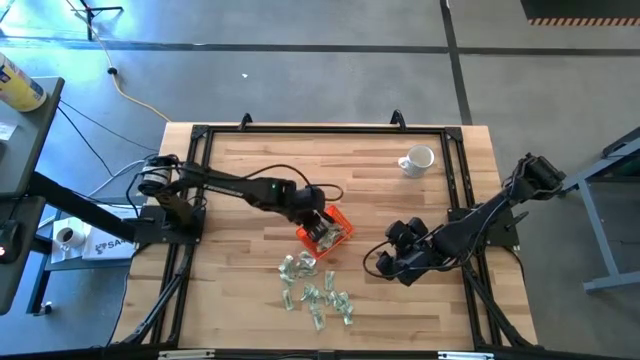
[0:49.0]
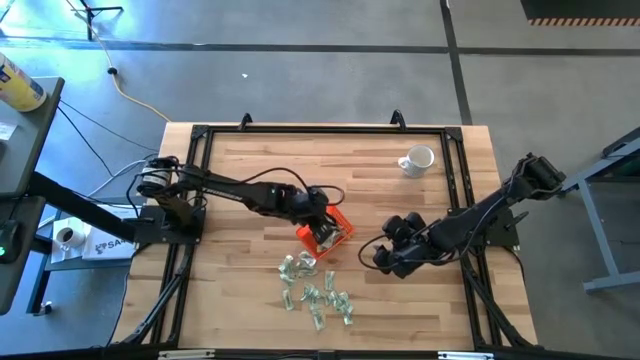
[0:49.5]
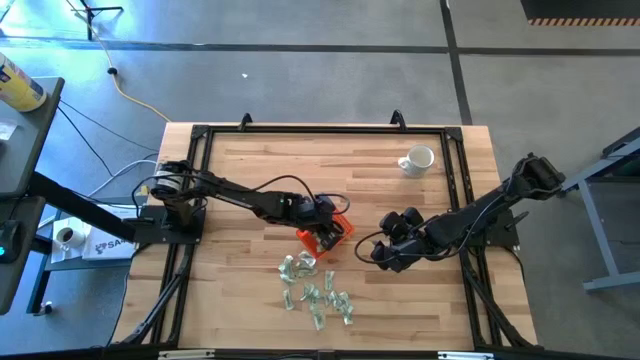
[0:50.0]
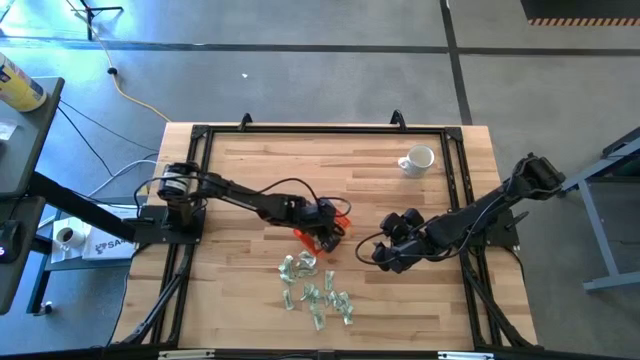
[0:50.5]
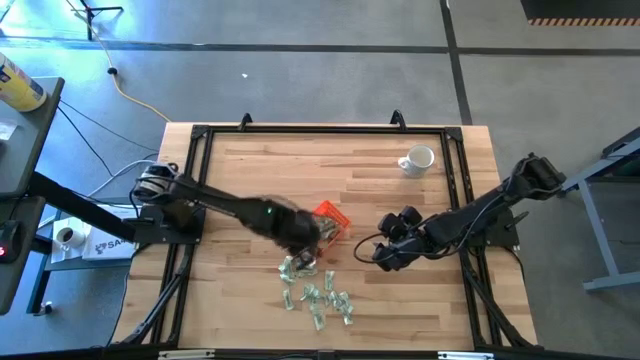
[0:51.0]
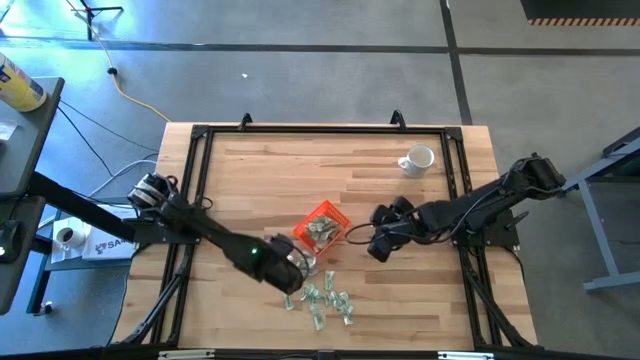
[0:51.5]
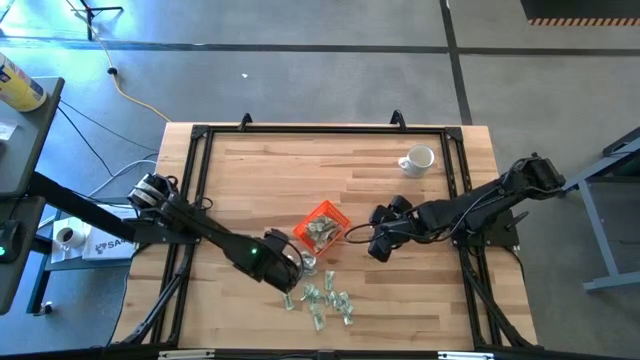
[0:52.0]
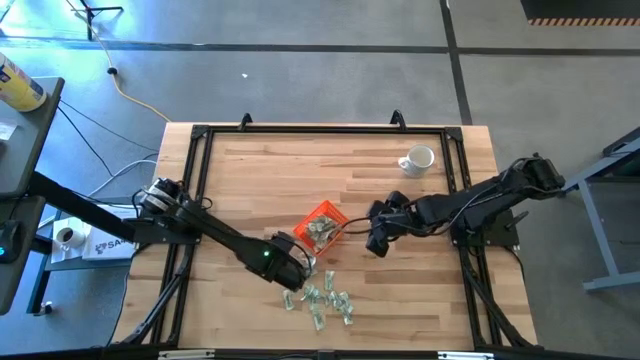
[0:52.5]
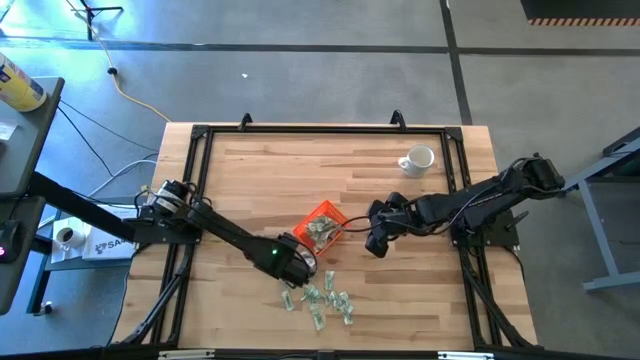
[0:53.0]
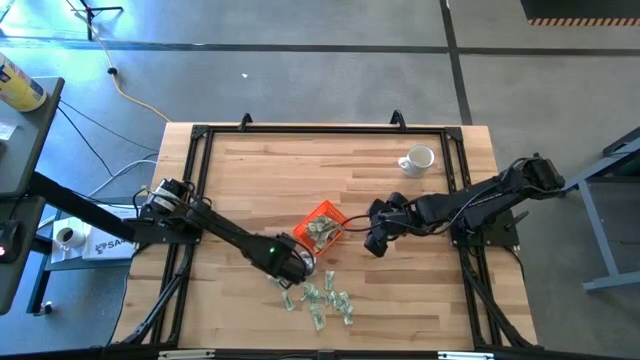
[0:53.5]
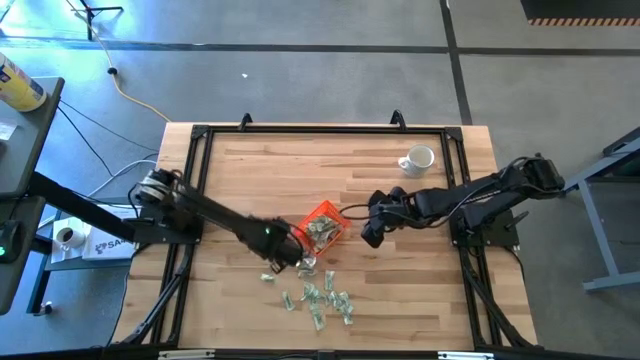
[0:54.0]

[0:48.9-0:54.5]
Task: Pick and place Stevia / Truvia into bins
Put the stevia packet into the orange bin

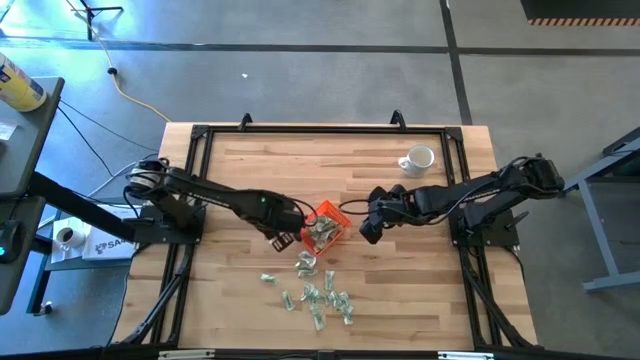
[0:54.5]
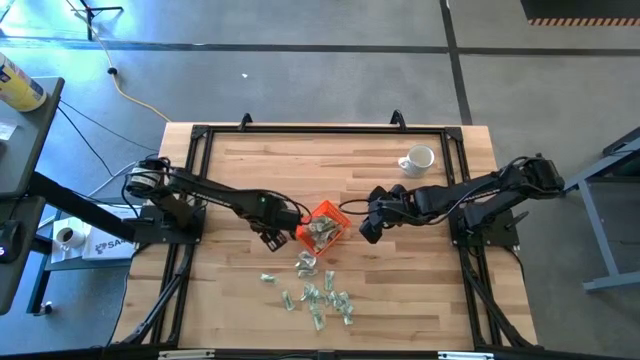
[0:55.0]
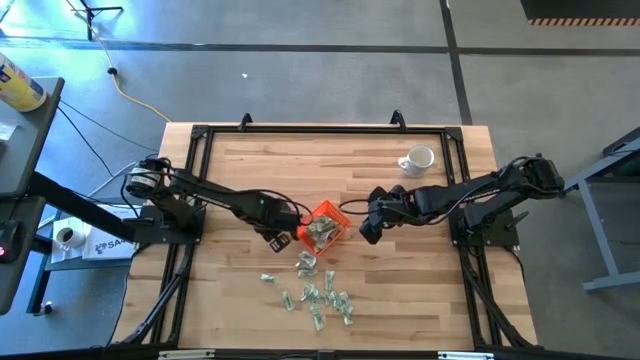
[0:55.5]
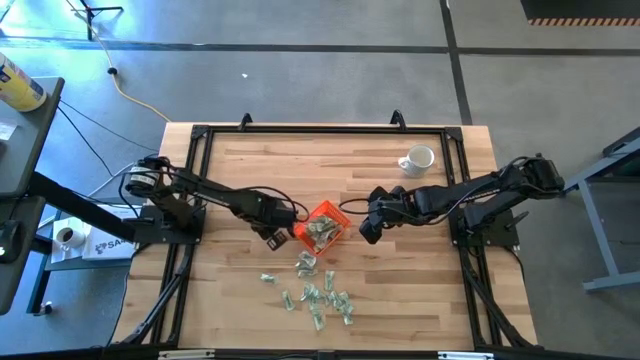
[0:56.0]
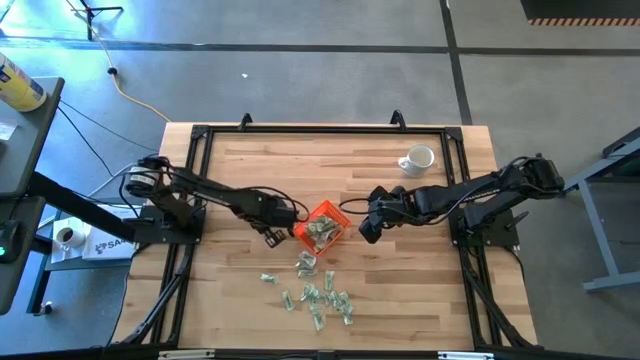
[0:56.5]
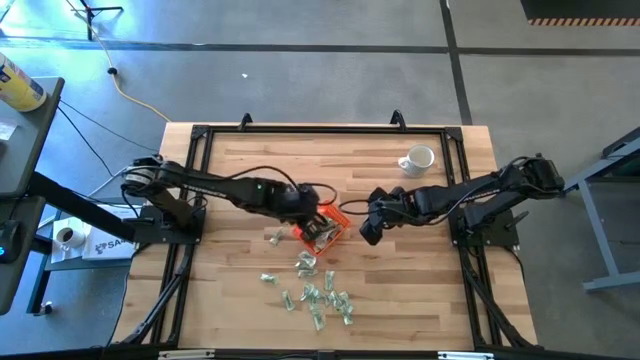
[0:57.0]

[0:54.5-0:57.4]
Put the stevia packet into the orange bin

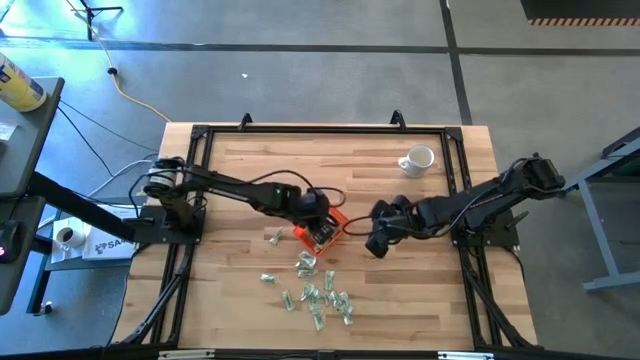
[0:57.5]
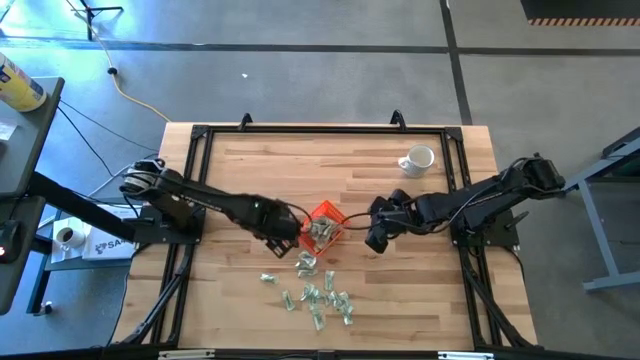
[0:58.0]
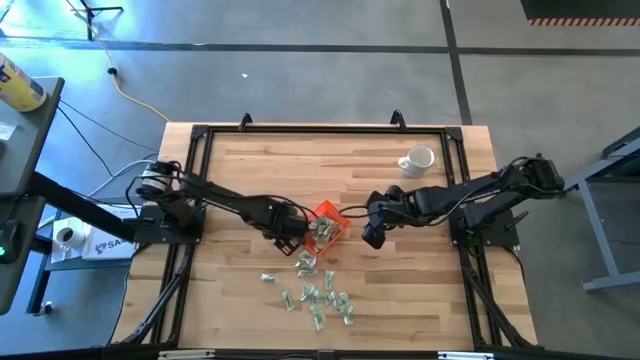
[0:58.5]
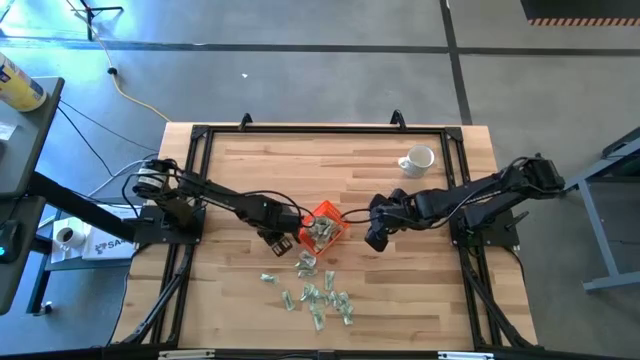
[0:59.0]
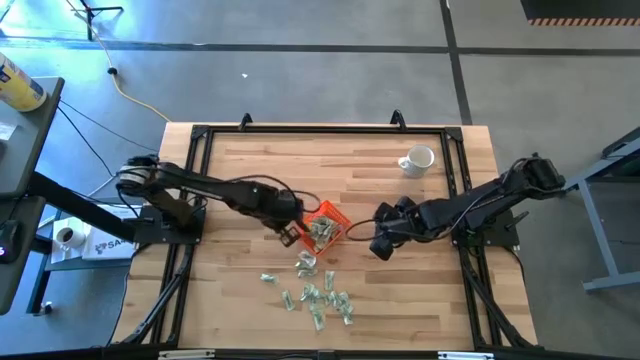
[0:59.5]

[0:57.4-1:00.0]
Put the stevia packet into the orange bin

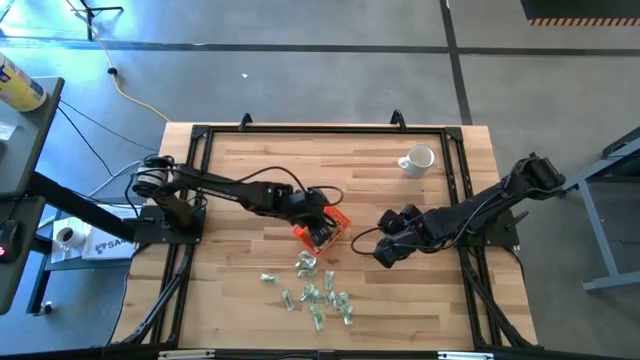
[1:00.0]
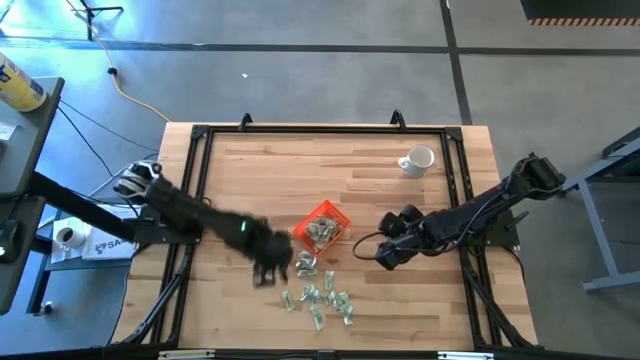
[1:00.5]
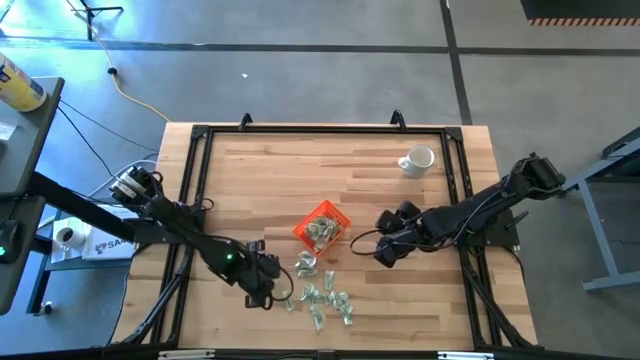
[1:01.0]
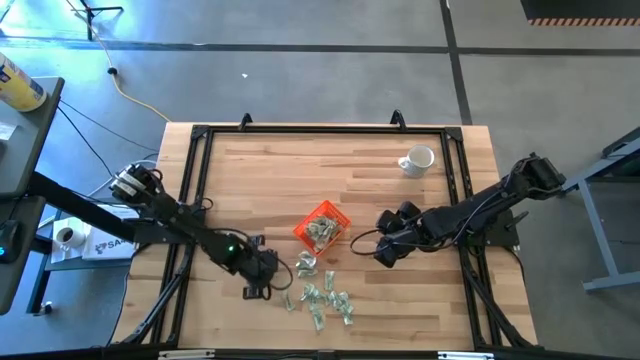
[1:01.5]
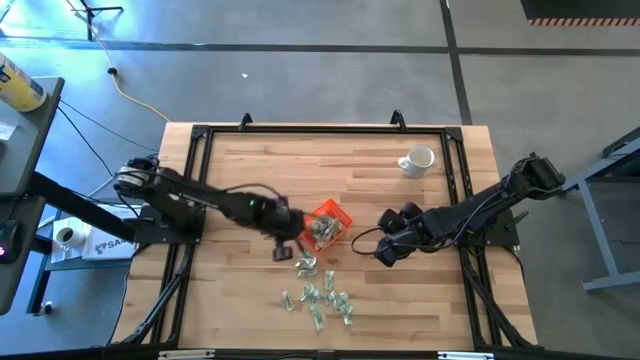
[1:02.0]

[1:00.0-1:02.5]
Put the stevia packet into the orange bin

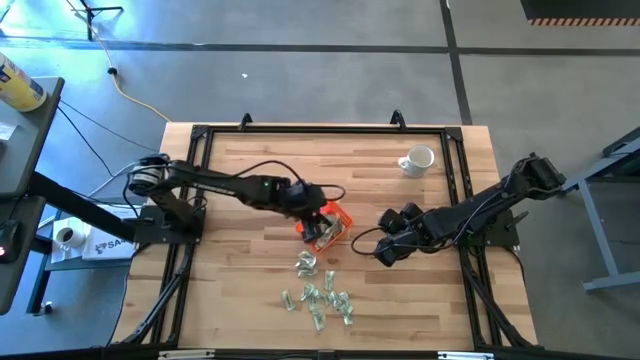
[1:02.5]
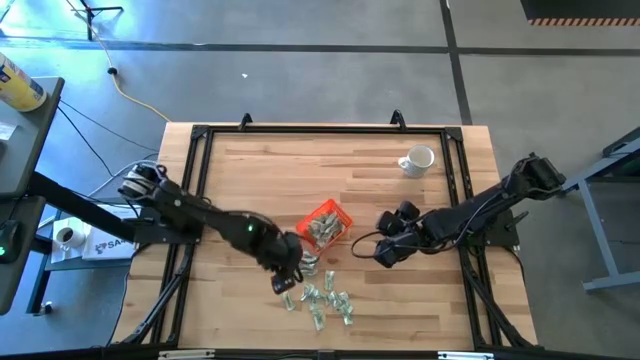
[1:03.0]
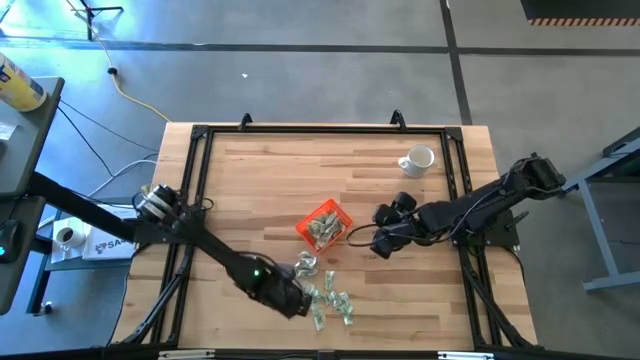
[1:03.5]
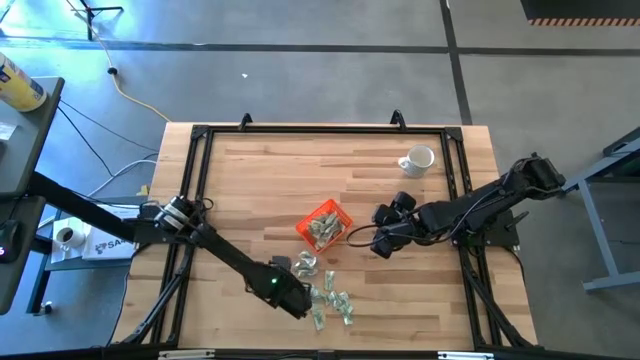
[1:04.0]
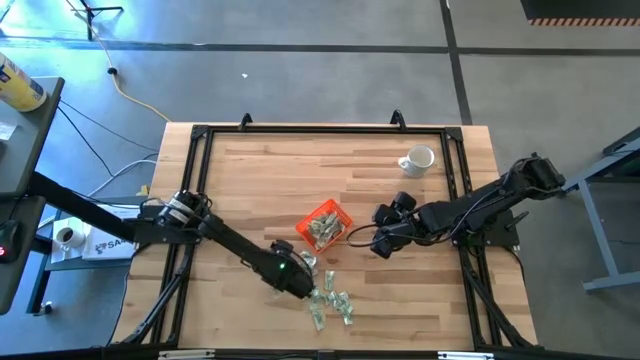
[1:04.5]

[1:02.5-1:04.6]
Put the stevia packet into the orange bin

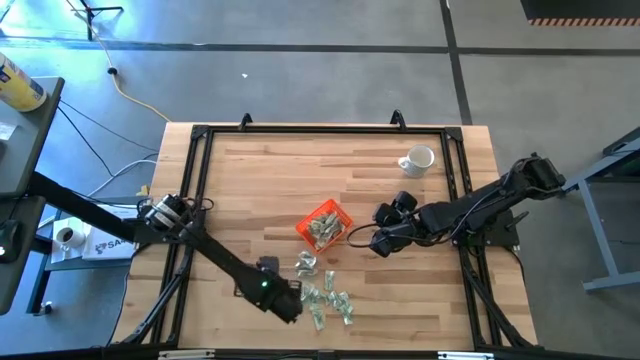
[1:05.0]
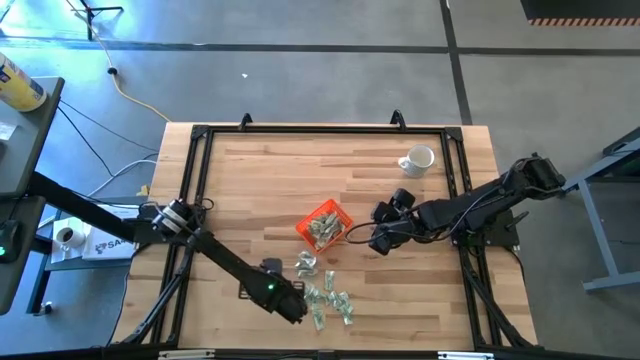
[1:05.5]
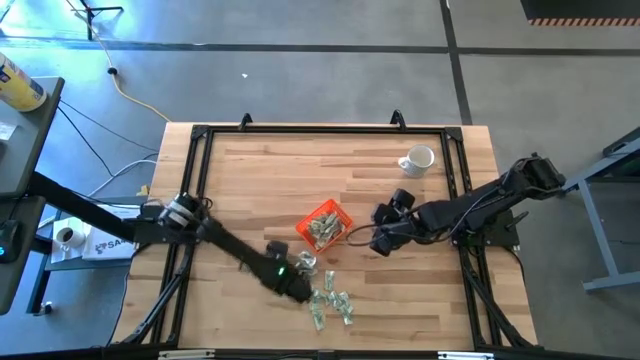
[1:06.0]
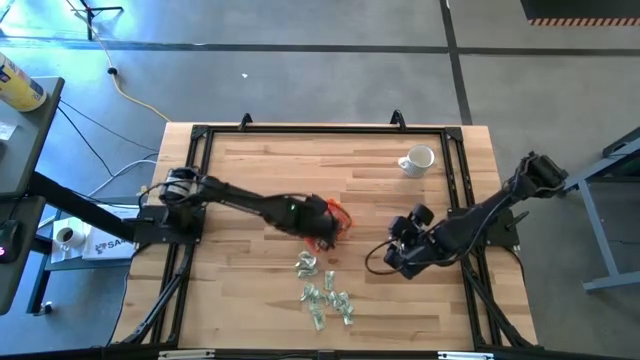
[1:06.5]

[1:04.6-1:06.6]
Put the stevia packet into the orange bin

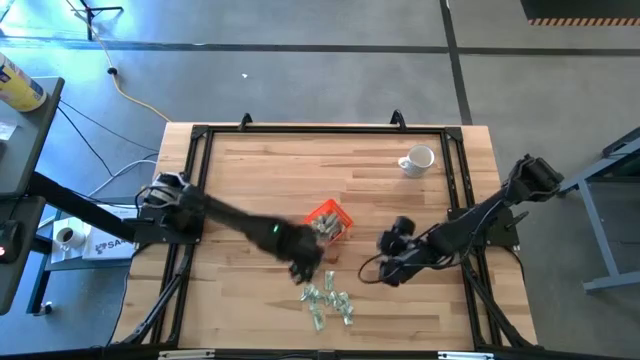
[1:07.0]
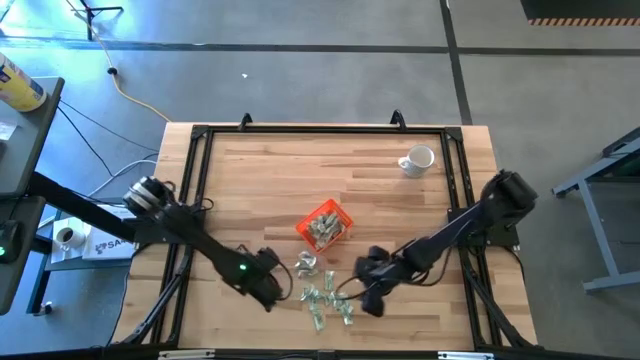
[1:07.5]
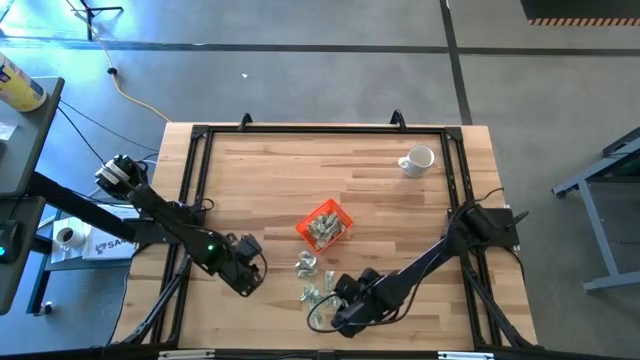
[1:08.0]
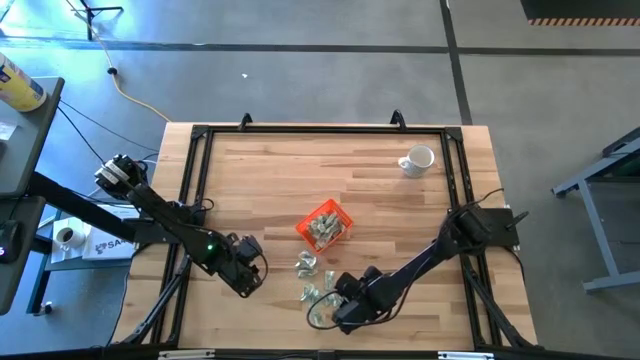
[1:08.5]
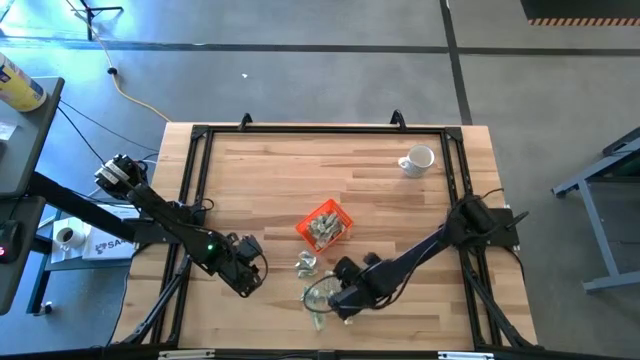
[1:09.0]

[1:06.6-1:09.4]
Put the stevia packet into the orange bin

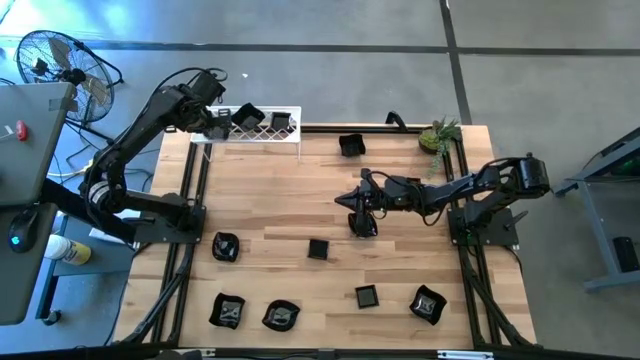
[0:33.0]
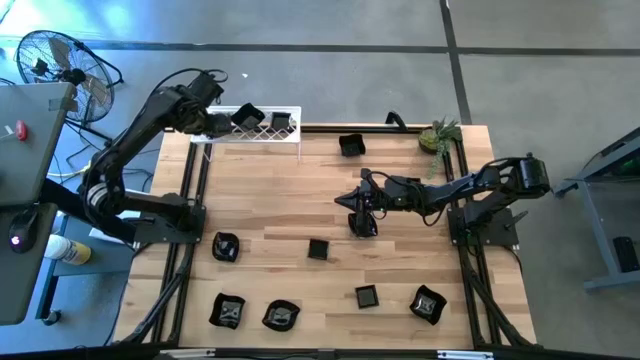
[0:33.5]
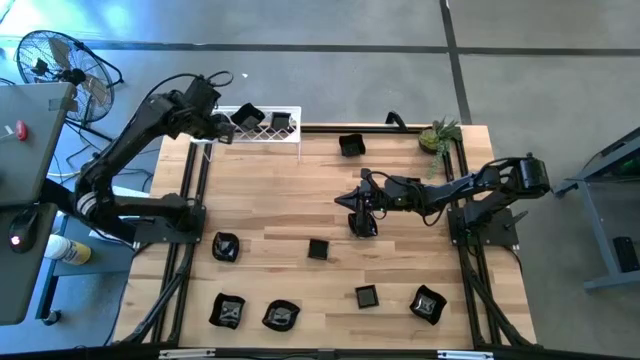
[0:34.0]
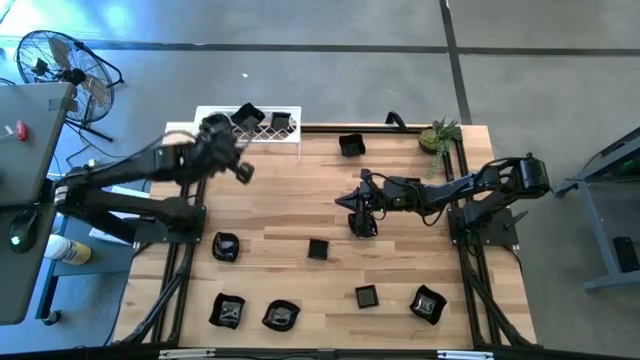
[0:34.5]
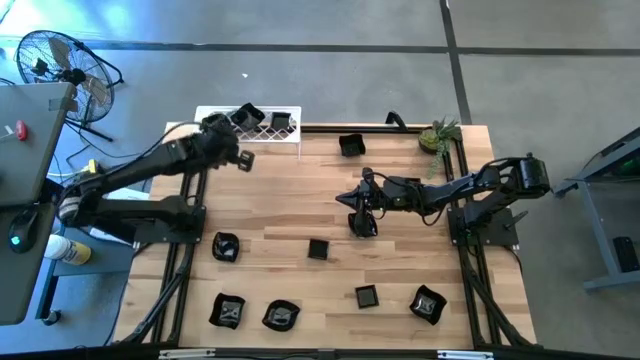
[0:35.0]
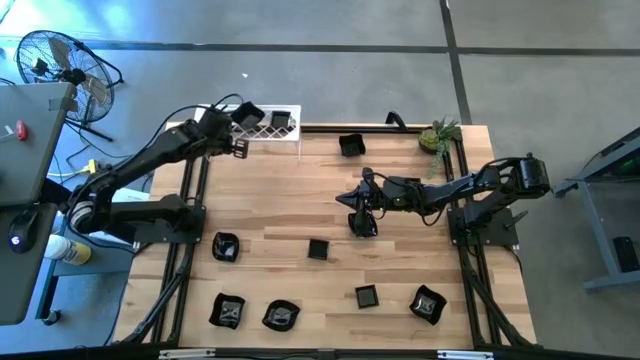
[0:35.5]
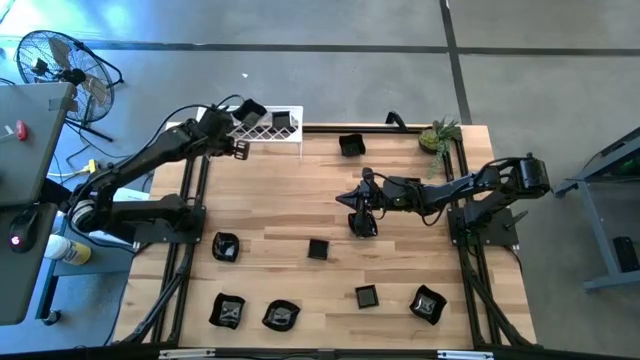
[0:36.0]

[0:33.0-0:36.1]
Task: Pick & Place Mini shaped plates
Adjust the black leaf-shaped plate on the shelf
